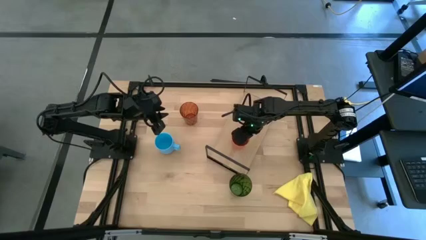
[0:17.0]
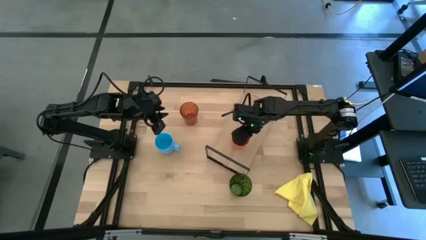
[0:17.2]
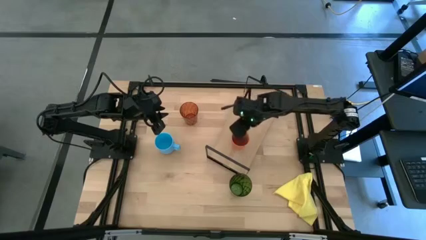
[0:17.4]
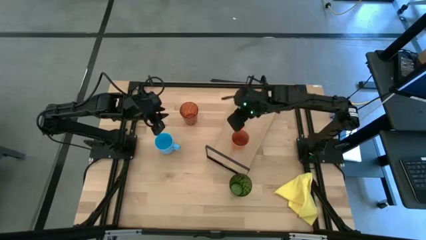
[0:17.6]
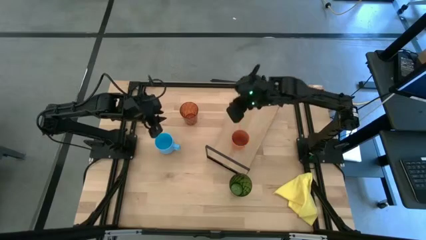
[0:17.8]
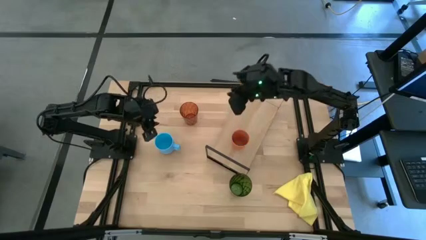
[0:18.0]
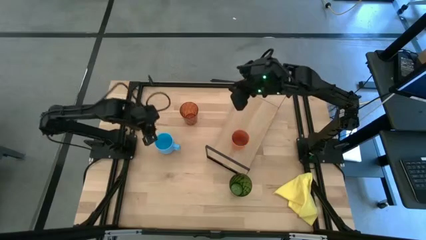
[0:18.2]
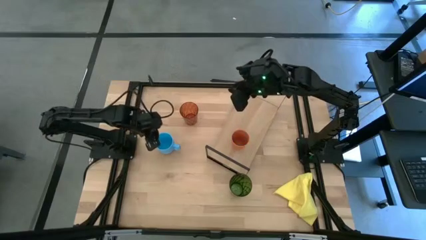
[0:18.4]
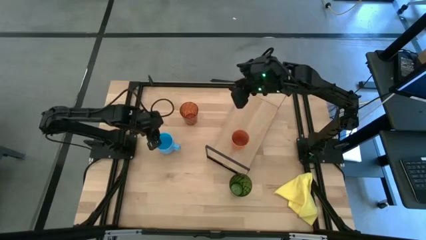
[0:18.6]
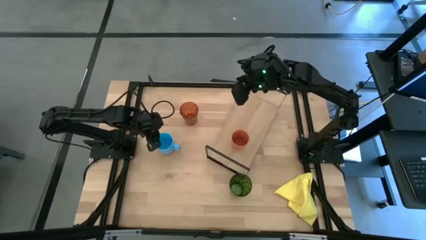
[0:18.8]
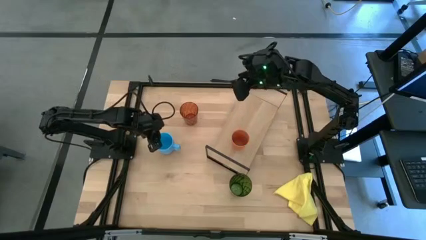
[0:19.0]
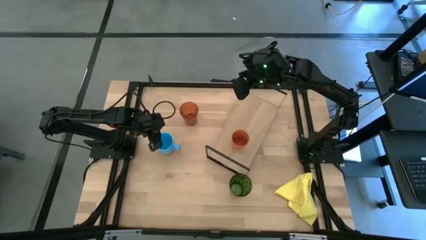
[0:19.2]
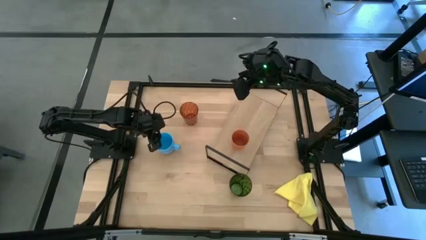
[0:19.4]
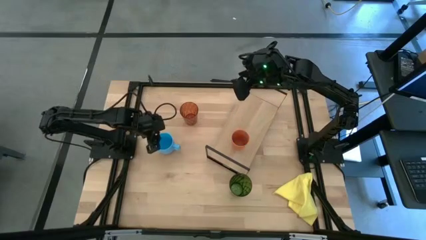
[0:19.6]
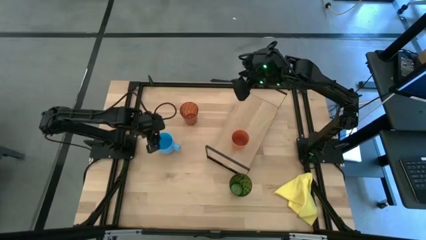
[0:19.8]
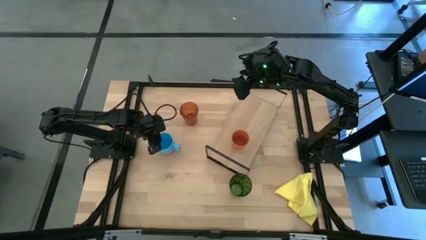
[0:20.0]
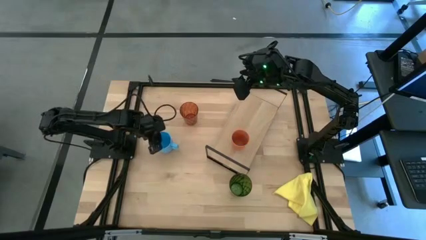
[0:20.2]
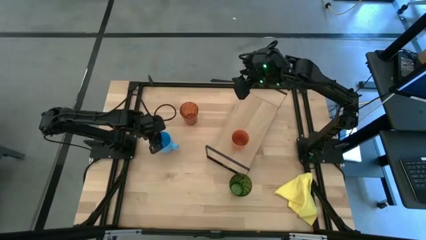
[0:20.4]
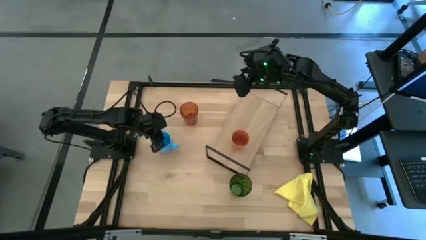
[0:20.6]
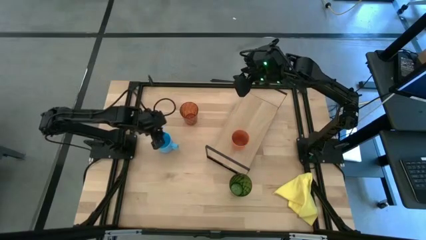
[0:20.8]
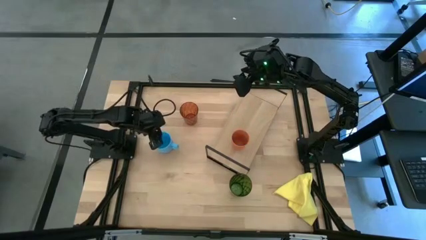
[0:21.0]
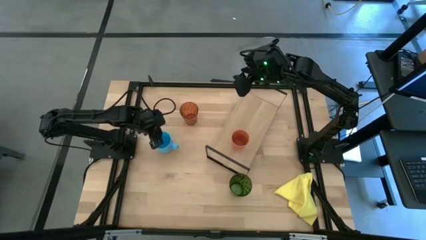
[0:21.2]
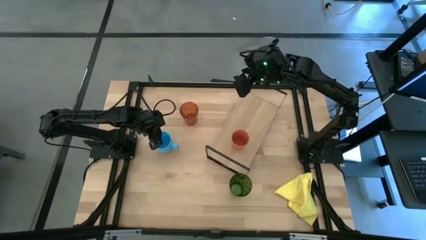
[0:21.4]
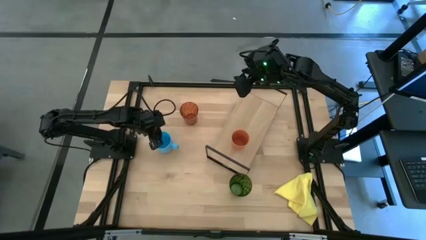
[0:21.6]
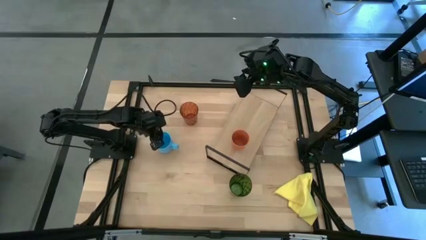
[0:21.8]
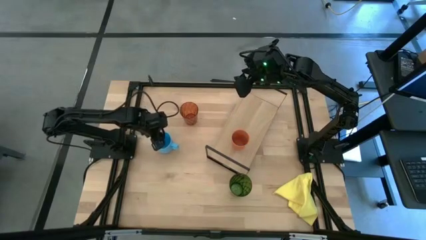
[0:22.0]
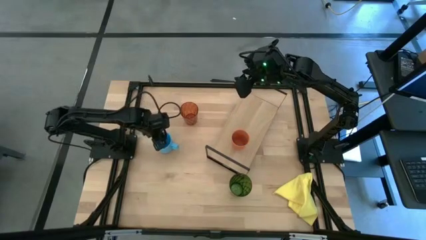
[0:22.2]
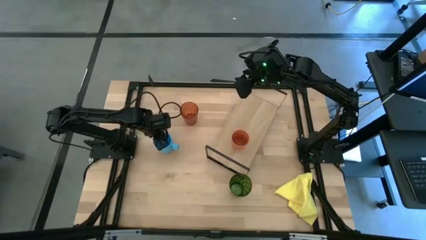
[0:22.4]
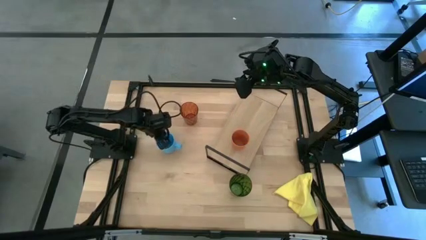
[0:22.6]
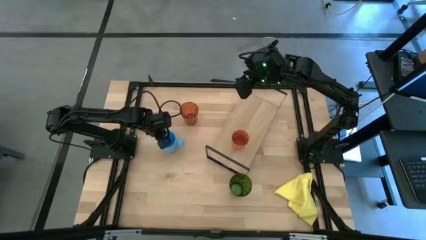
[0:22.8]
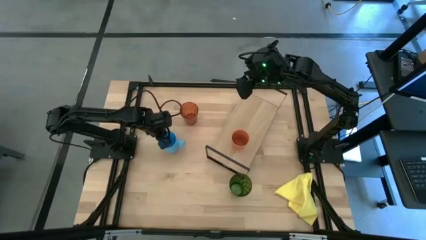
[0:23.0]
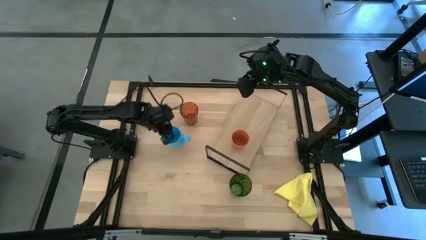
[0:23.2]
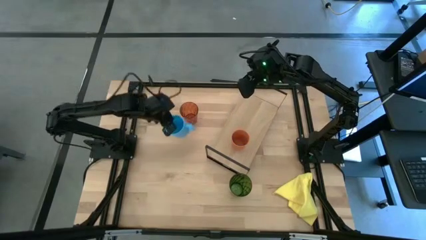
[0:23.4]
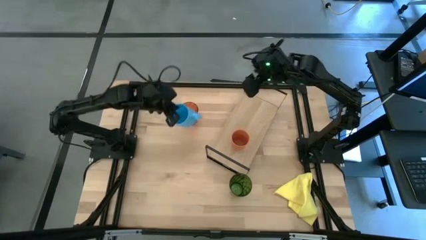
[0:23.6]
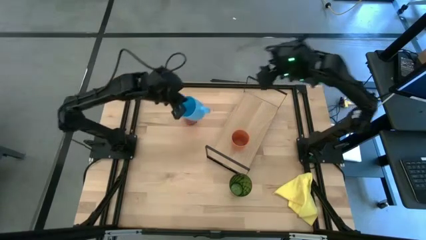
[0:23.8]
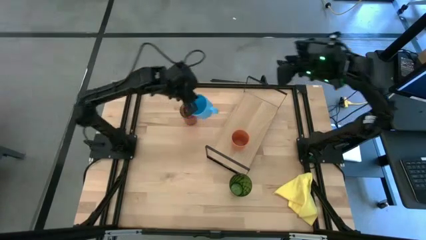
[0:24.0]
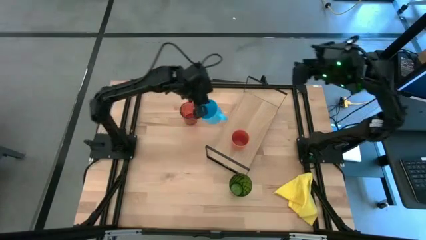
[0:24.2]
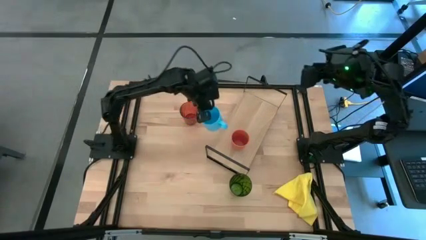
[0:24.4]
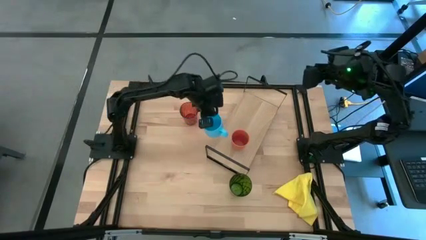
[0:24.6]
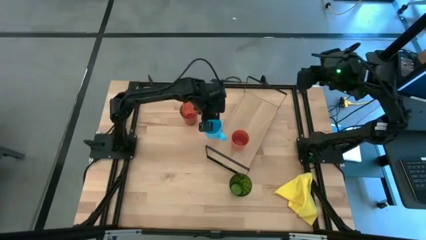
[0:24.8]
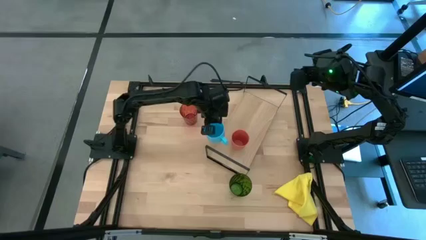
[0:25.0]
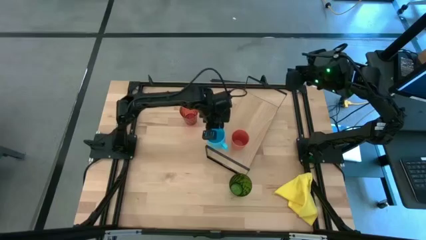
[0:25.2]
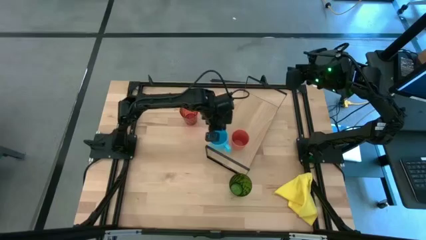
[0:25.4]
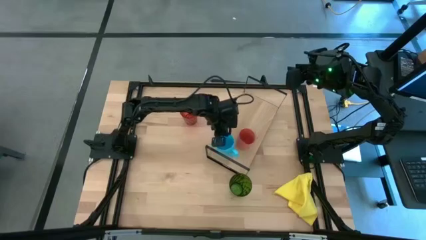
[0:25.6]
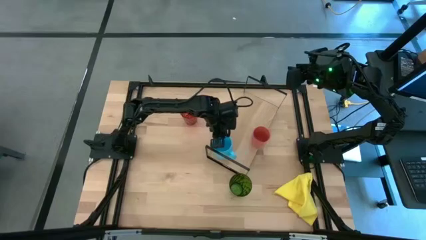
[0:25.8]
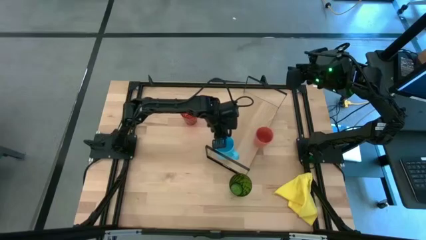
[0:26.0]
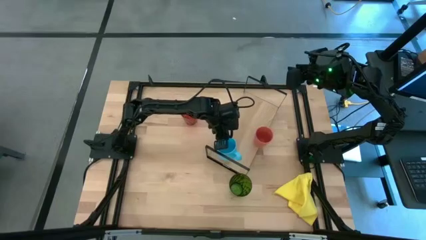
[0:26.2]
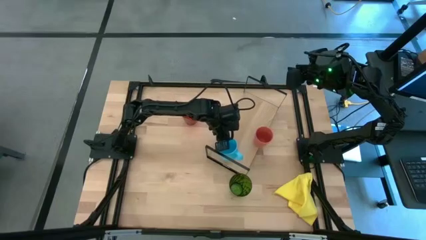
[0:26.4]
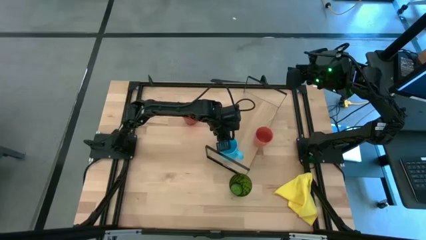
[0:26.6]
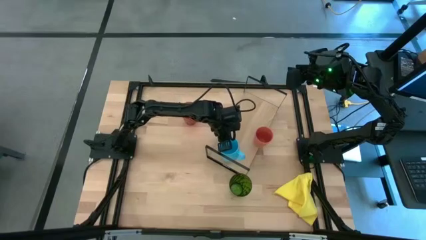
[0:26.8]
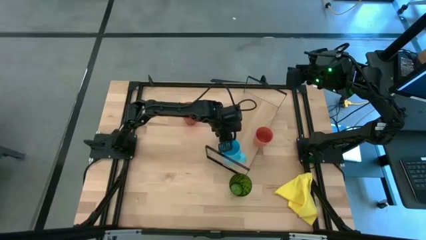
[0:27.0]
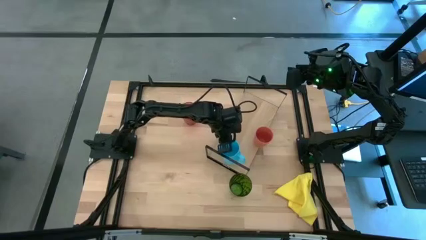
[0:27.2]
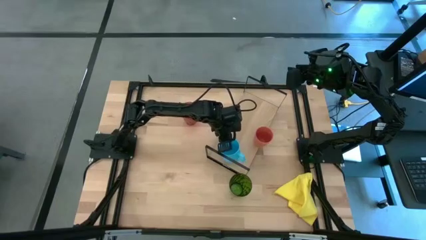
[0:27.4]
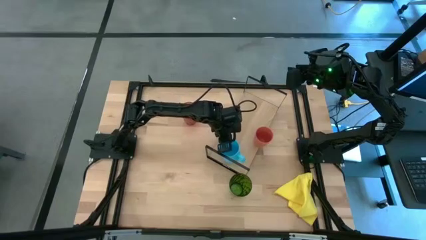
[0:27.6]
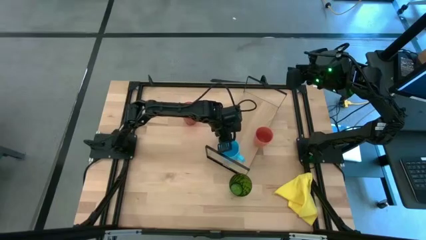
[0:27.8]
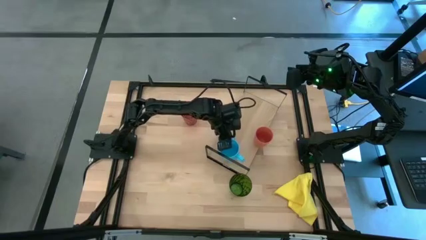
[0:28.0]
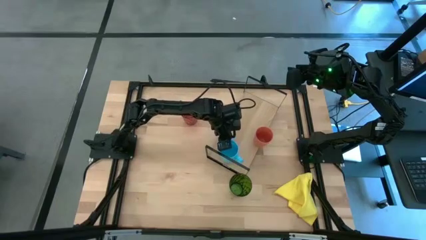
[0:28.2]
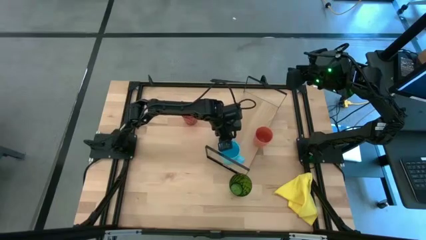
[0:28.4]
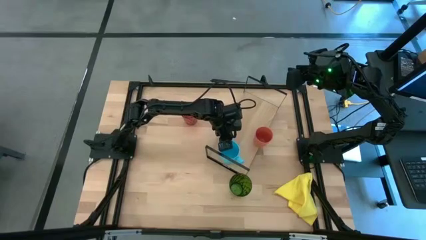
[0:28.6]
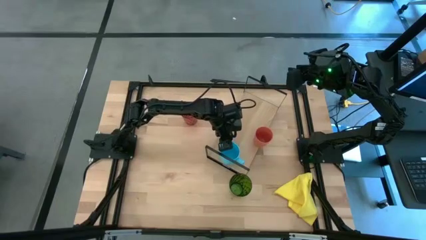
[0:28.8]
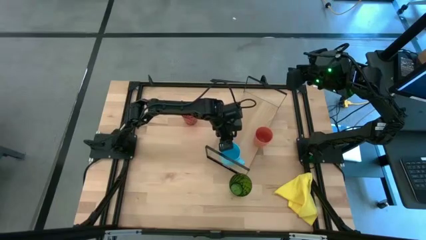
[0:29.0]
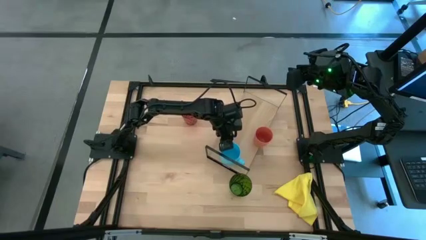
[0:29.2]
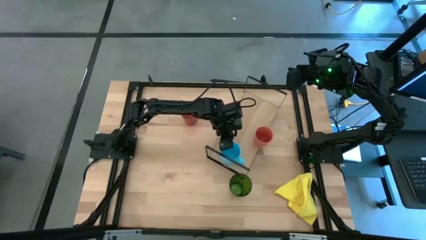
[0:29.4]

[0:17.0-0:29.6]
Task: Stack small to large cups/mugs on shelf
Put the blue mug on the shelf

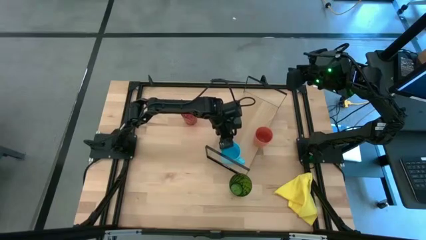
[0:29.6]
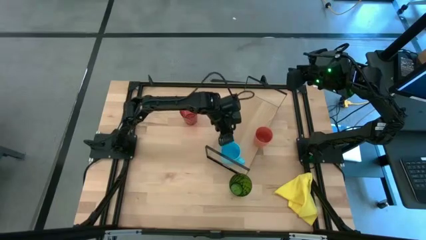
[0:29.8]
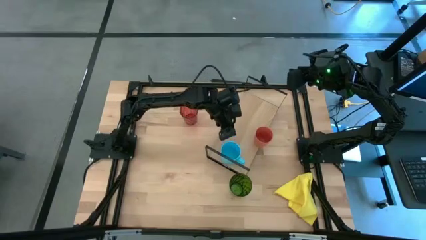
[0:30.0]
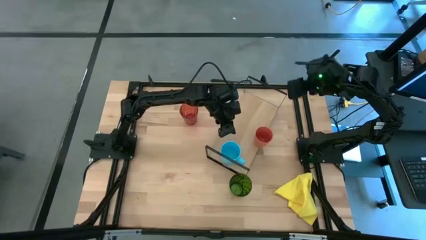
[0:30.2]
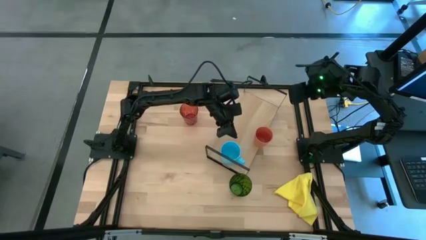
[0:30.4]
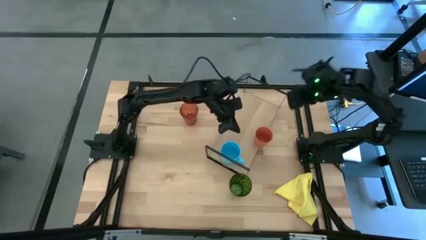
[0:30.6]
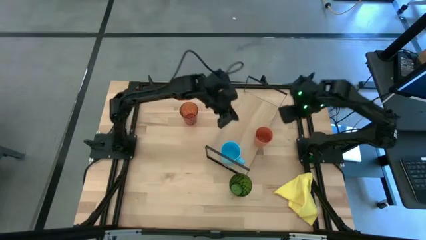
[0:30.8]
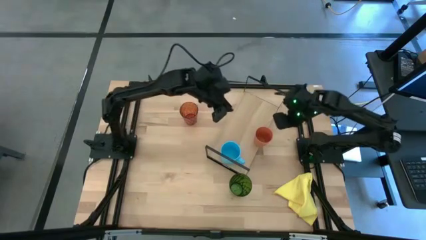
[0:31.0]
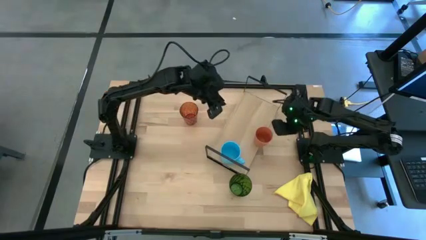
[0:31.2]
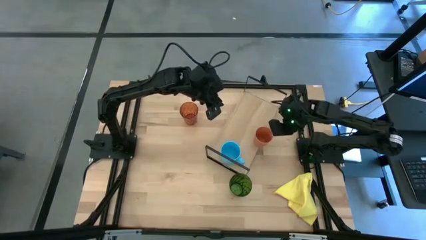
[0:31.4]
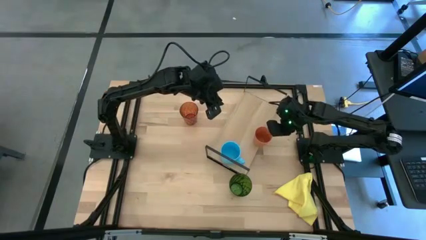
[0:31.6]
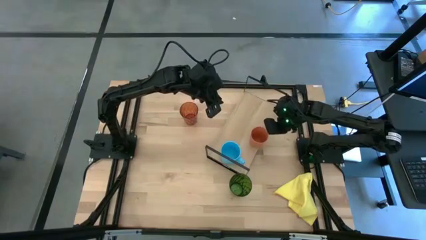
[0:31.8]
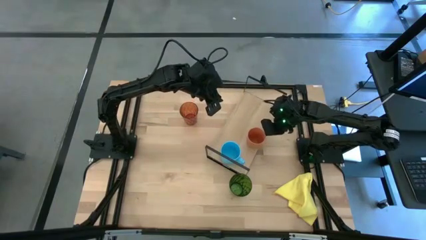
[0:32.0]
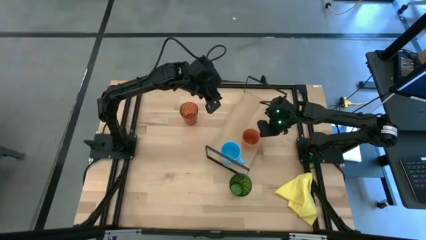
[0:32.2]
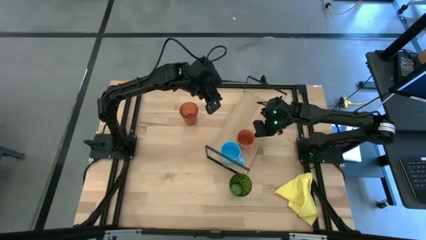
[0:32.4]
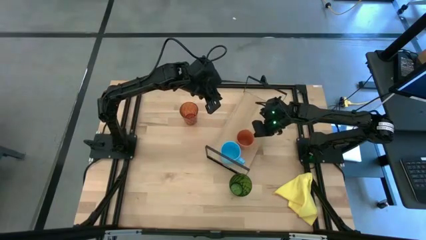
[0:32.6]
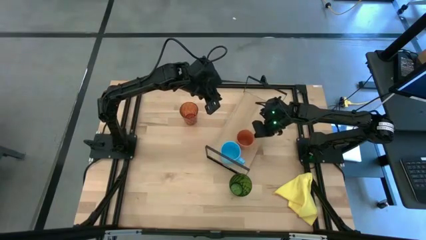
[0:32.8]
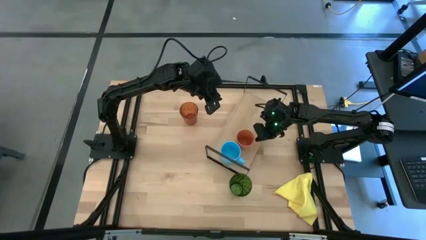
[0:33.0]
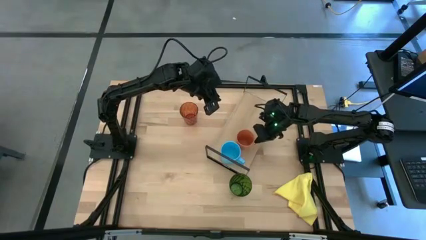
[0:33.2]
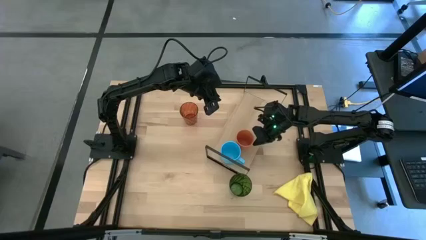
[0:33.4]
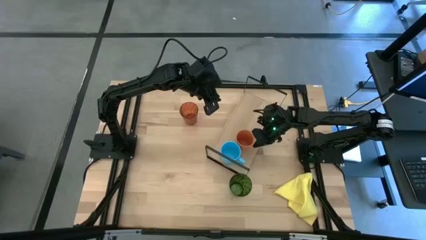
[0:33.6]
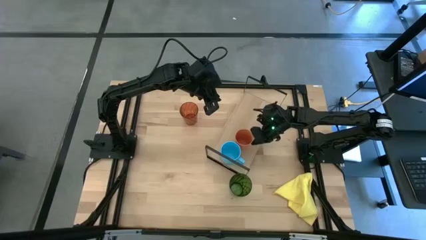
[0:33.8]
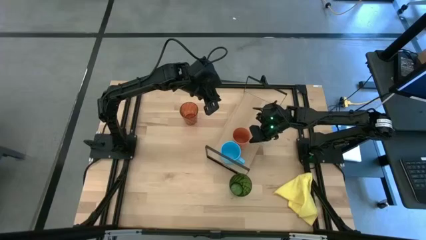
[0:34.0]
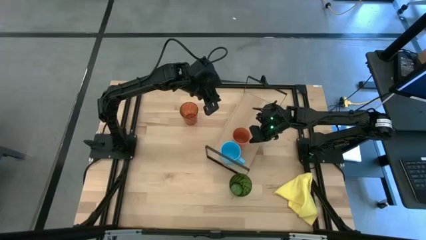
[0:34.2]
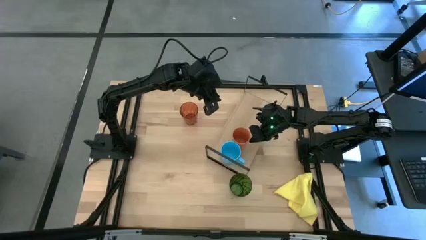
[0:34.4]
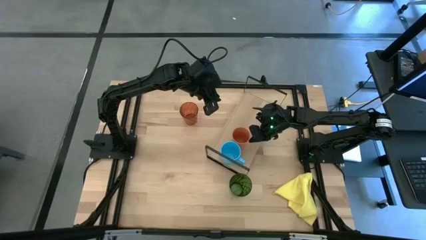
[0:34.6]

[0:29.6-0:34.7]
Adjust the orange cup
